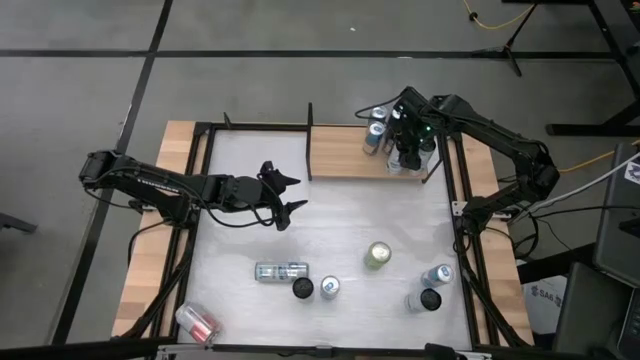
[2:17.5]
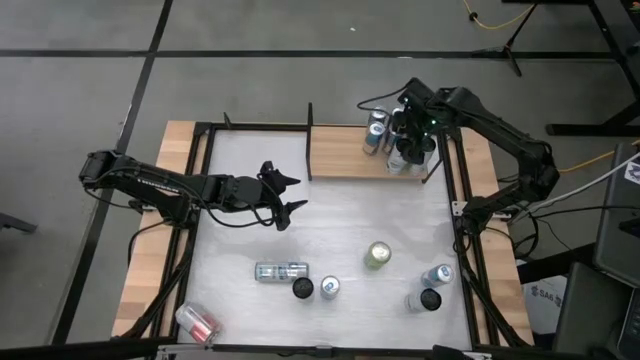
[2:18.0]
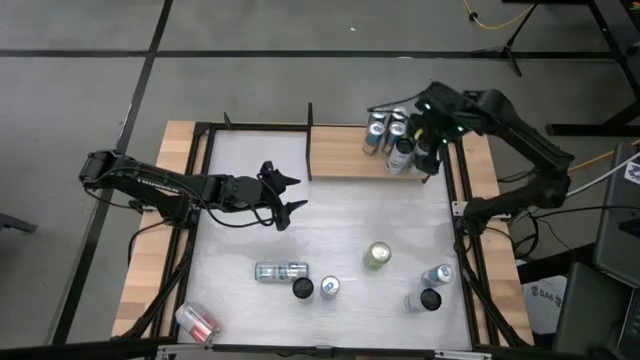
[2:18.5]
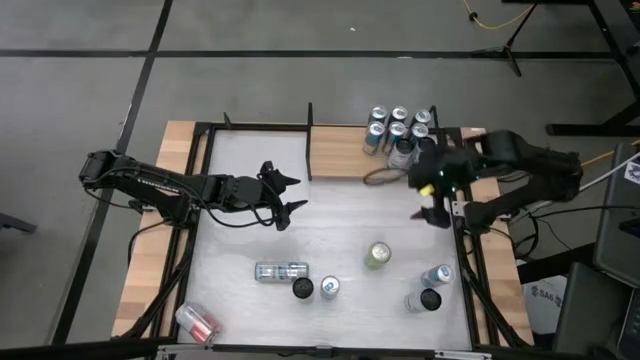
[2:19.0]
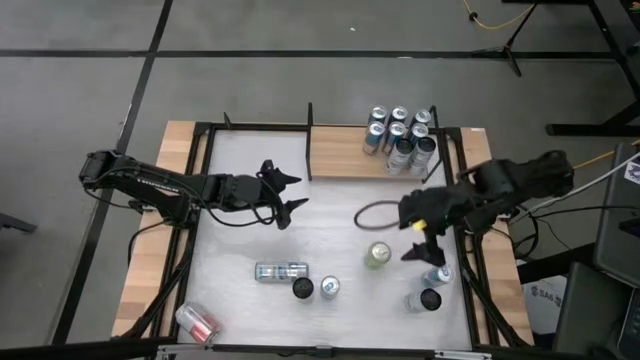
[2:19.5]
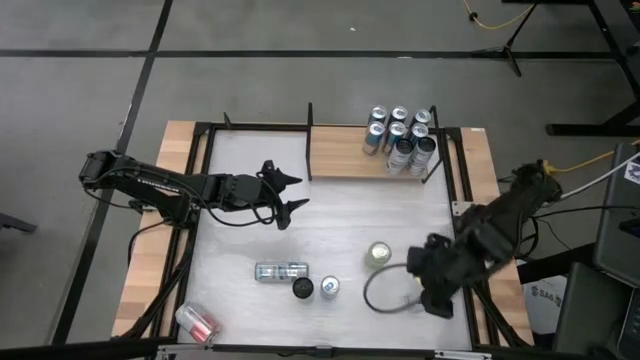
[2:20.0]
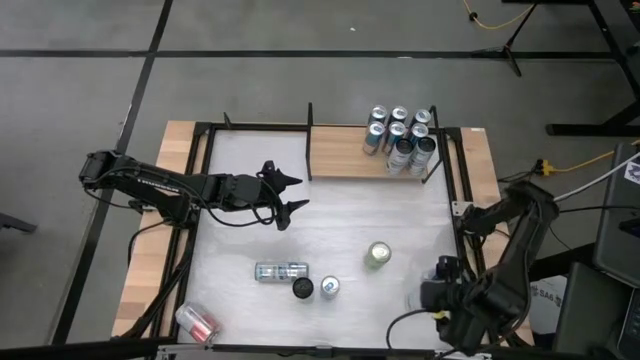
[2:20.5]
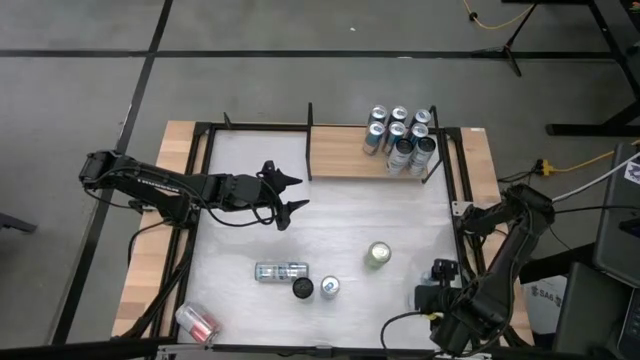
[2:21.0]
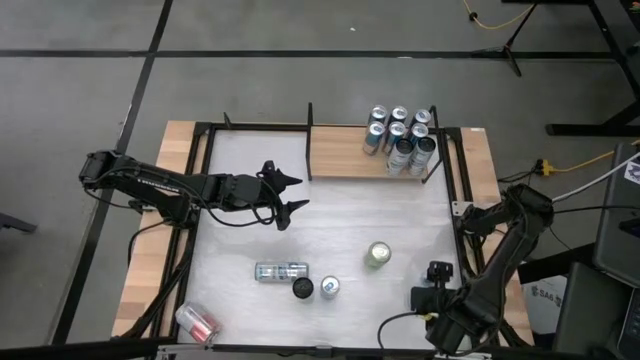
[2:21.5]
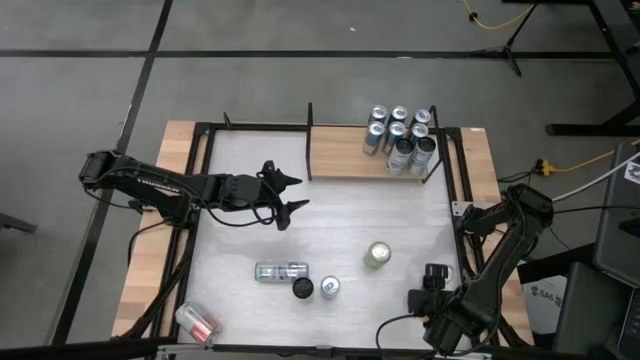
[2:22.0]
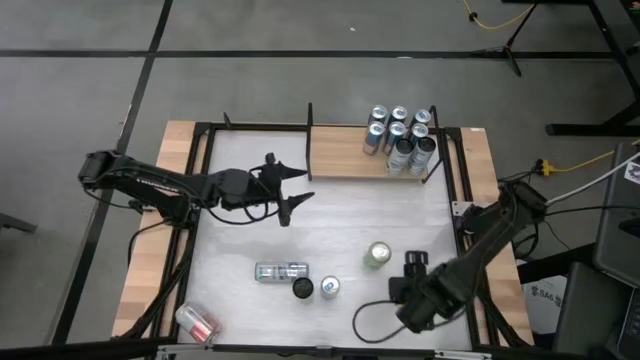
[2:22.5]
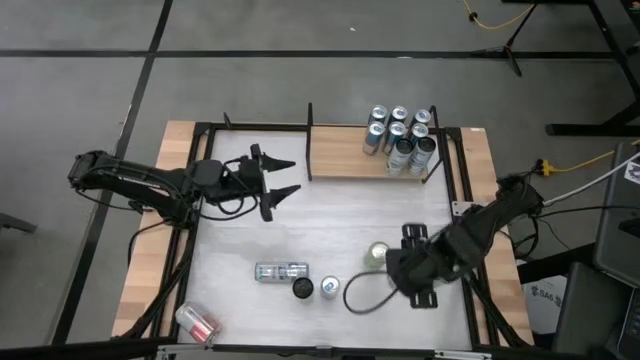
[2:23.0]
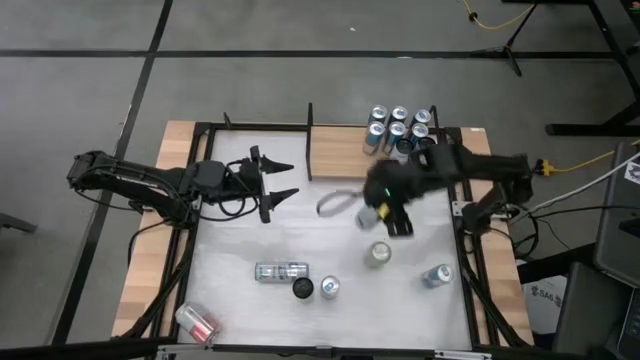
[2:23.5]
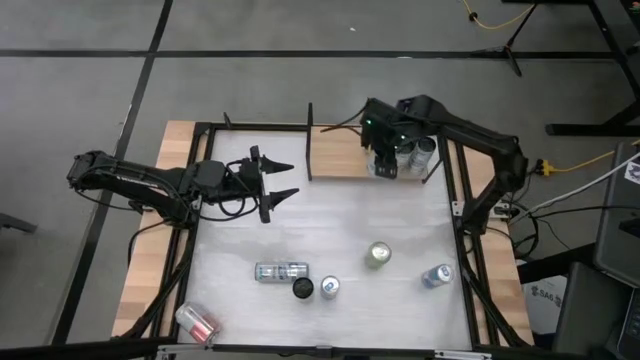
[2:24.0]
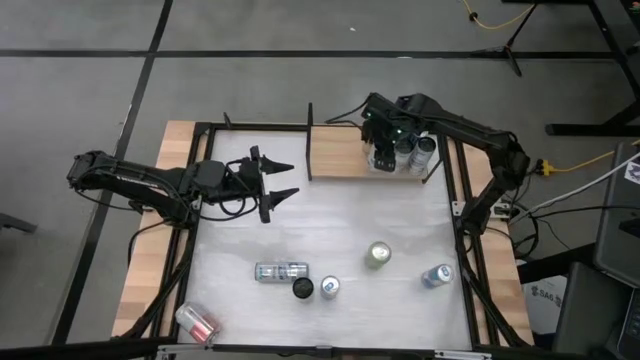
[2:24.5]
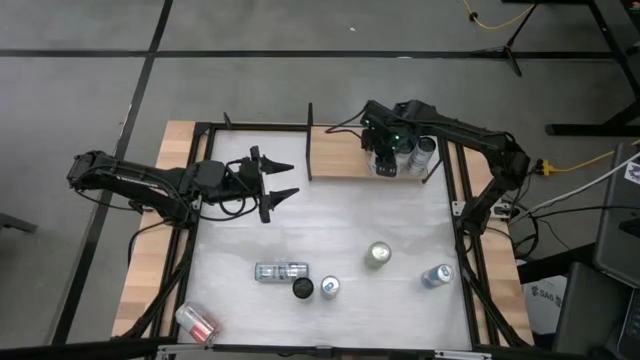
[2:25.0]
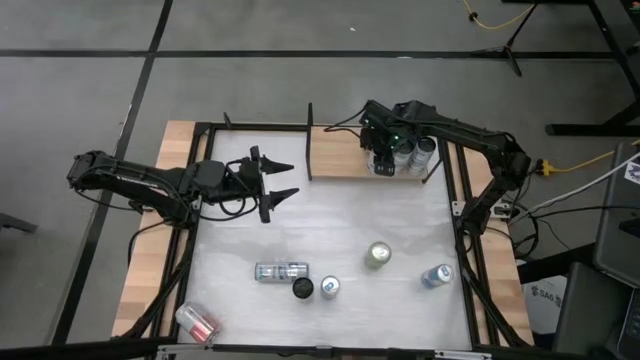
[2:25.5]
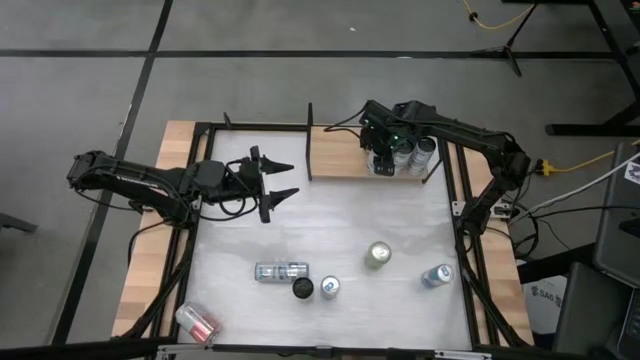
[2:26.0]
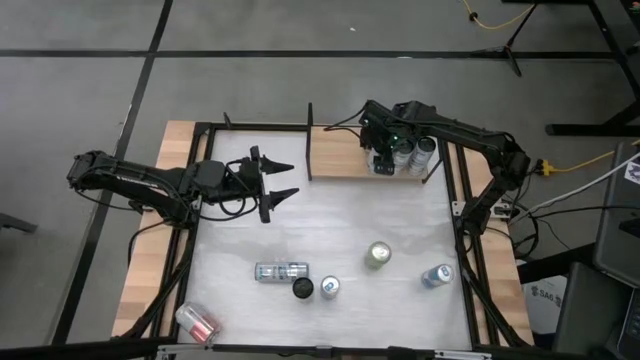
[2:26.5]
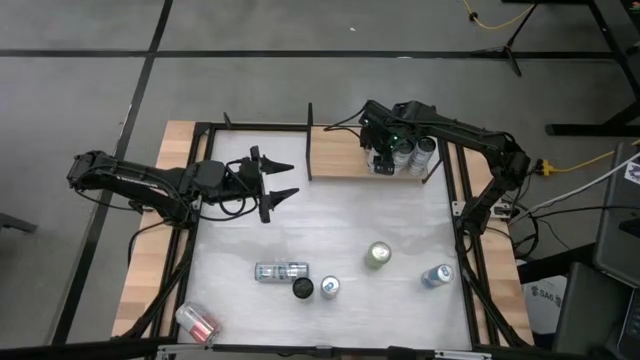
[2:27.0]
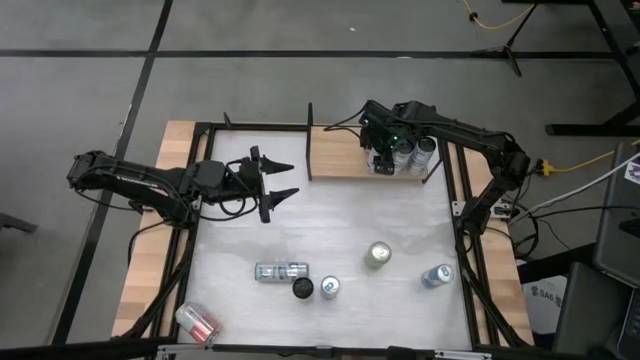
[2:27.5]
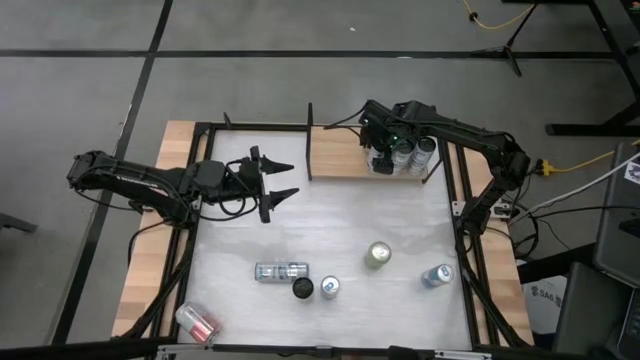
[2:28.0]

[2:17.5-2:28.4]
Task: Place canned beverage on shelf
Put the white-blue soda can on the shelf aligned with the other white-blue soda cans

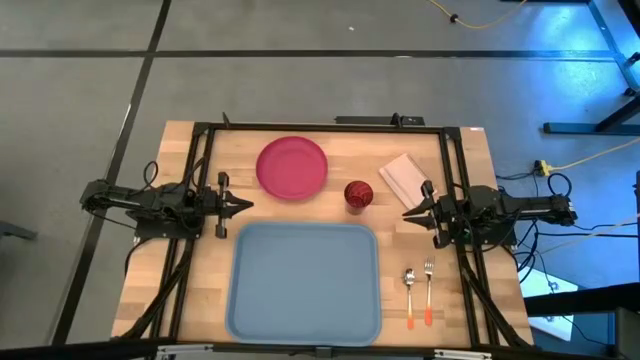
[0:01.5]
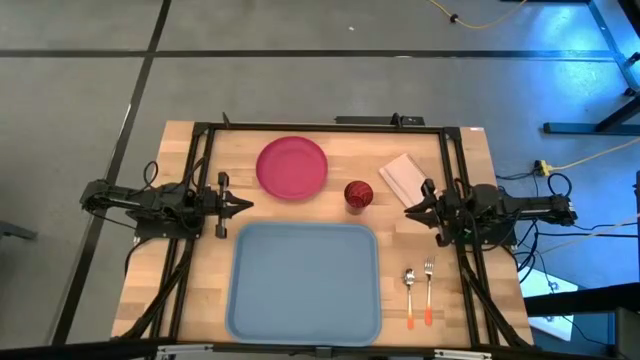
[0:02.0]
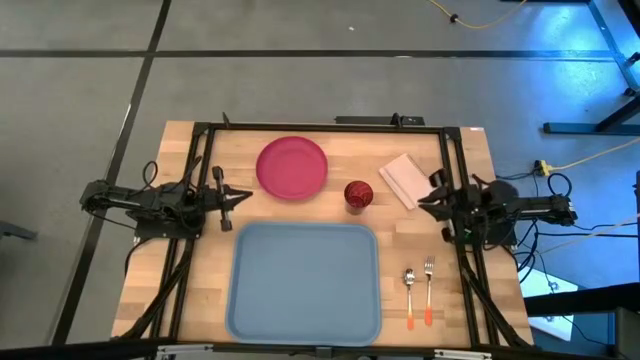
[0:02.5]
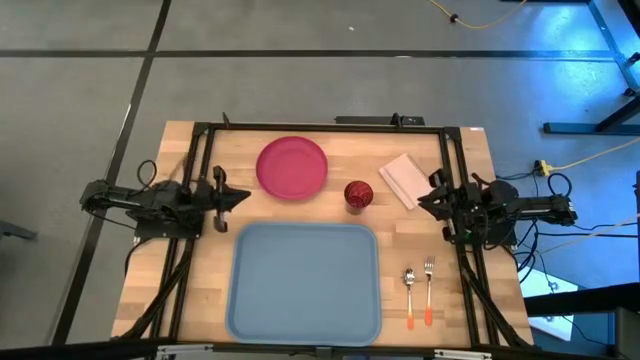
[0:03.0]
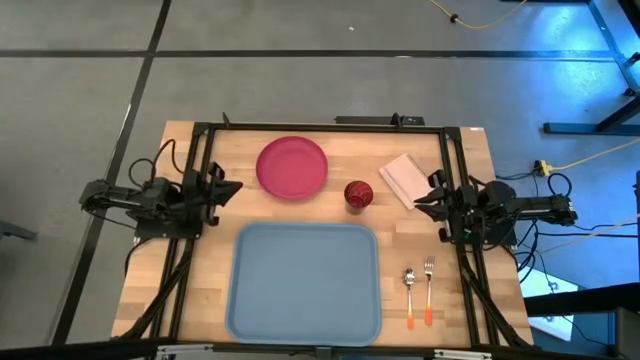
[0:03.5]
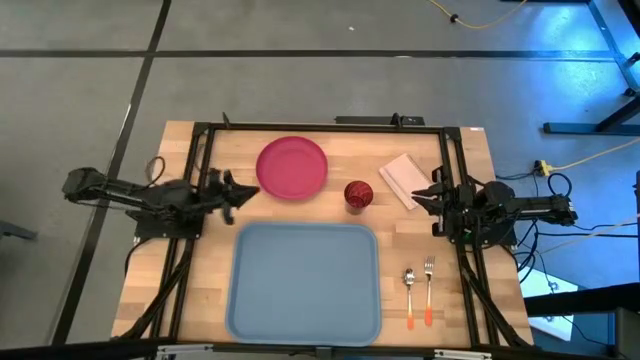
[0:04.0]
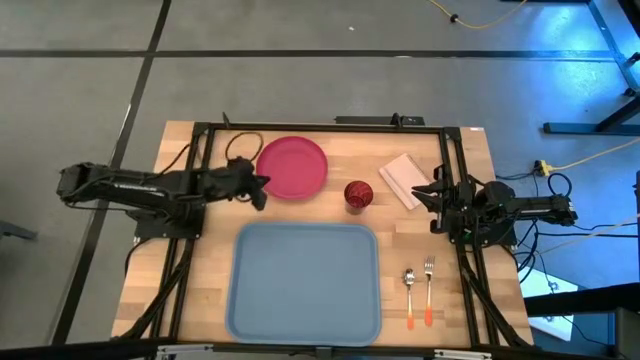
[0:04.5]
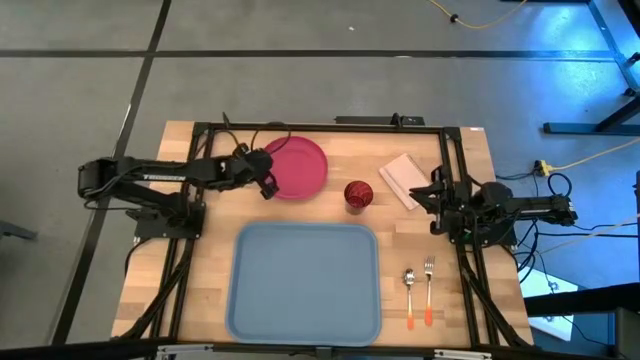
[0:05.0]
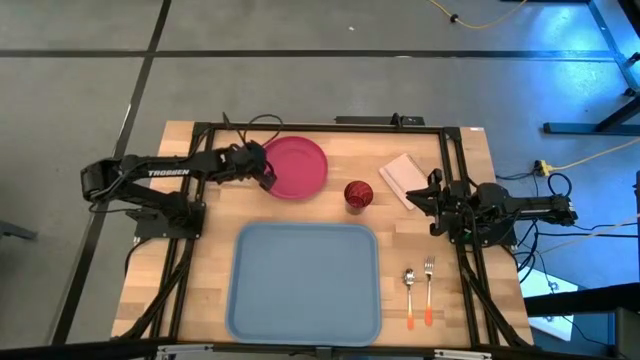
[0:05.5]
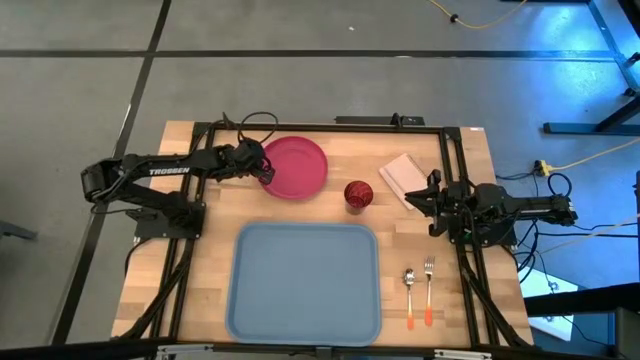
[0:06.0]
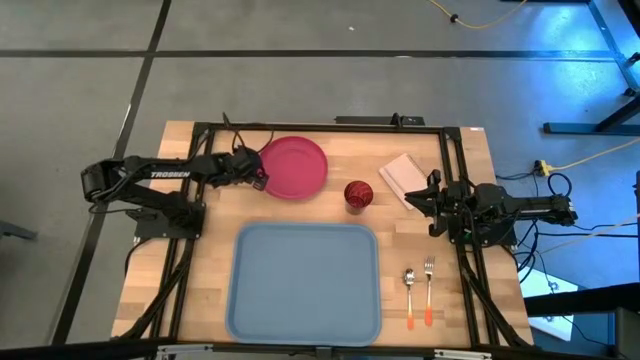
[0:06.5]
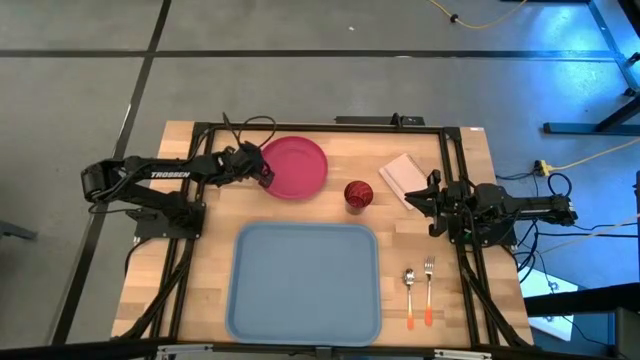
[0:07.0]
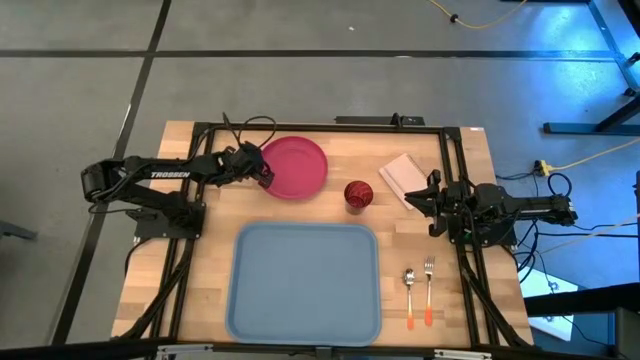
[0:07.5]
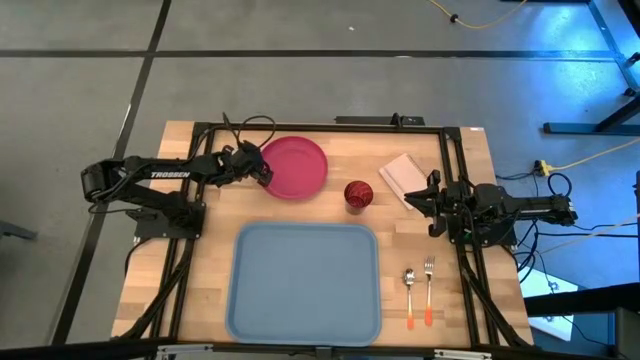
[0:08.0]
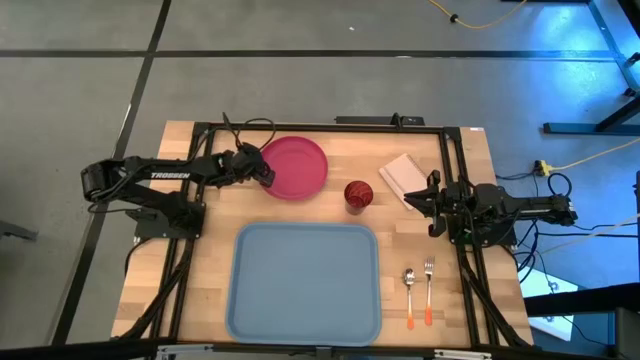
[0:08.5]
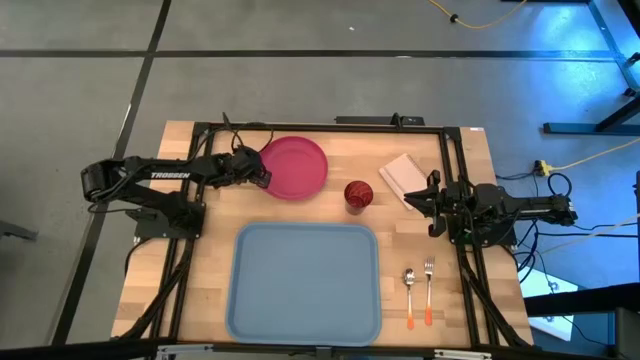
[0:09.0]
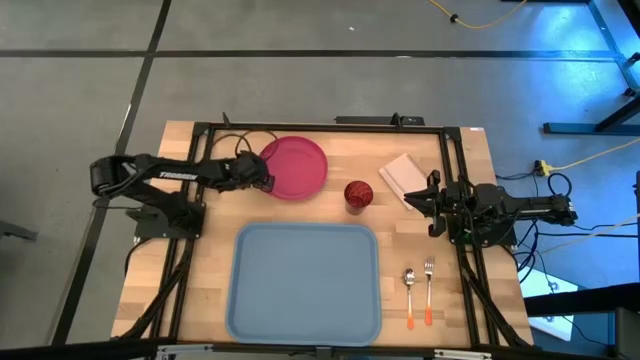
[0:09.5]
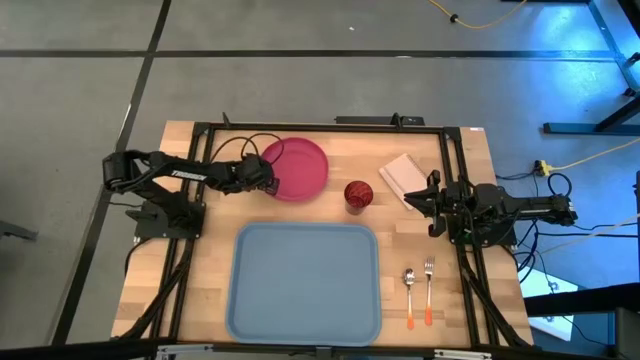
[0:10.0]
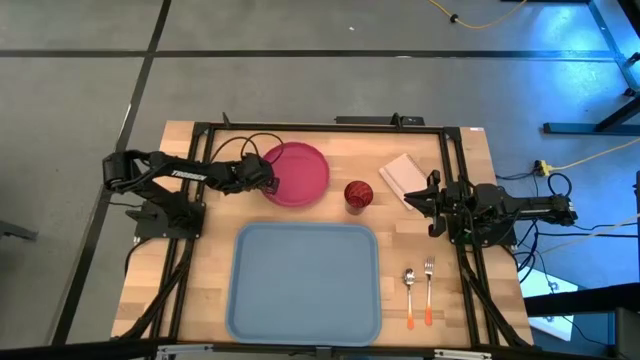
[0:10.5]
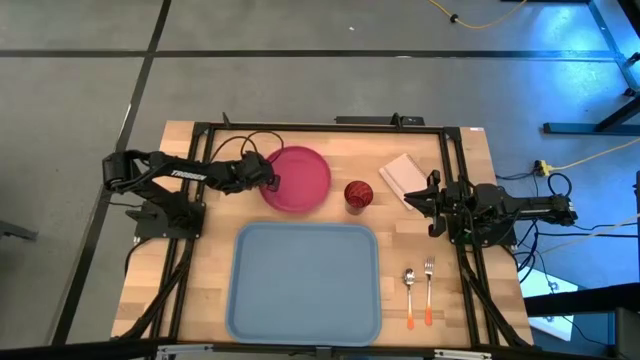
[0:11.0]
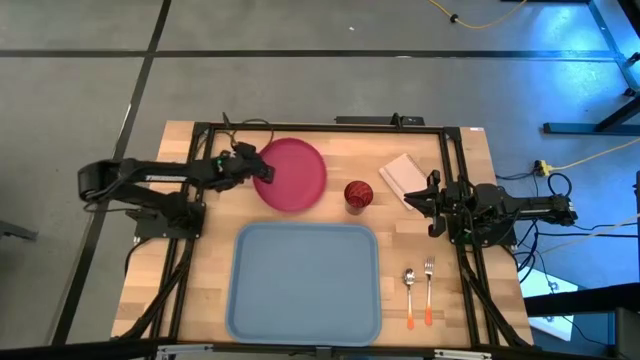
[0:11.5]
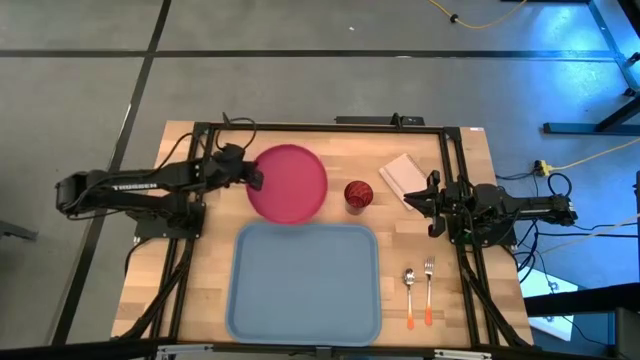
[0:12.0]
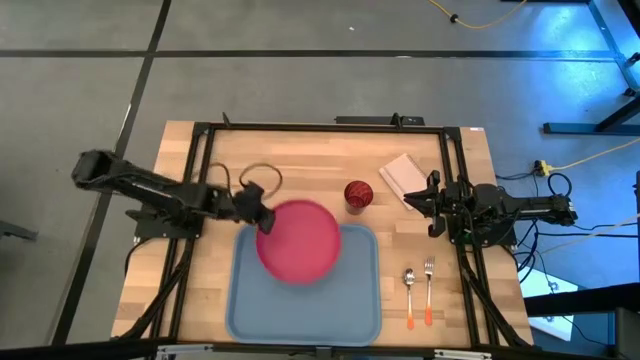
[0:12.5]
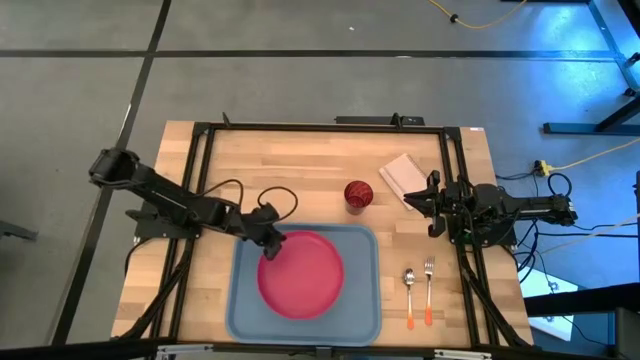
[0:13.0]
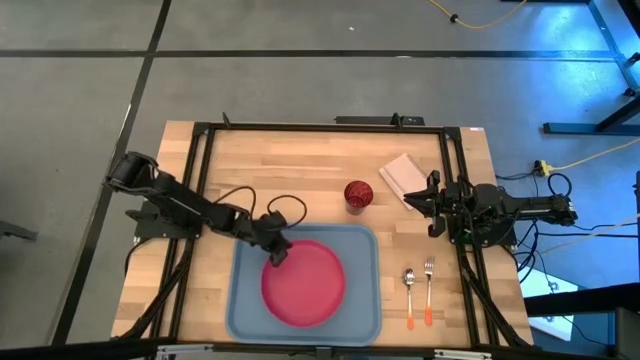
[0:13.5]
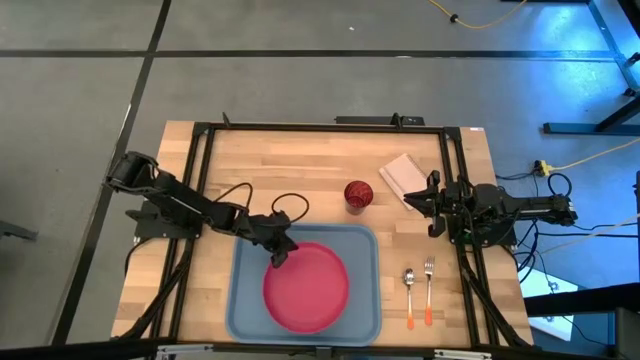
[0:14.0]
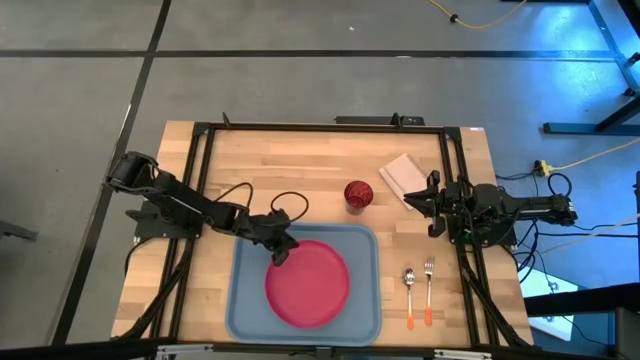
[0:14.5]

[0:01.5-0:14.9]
Task: Pick and place plate/cup/fork/spoon on tray
Put the pink plate on the blue tray
